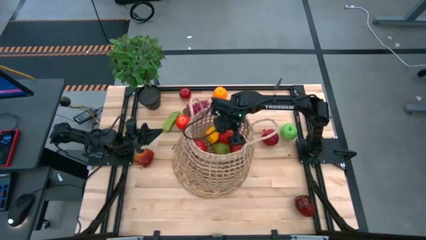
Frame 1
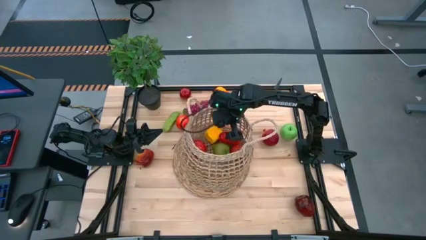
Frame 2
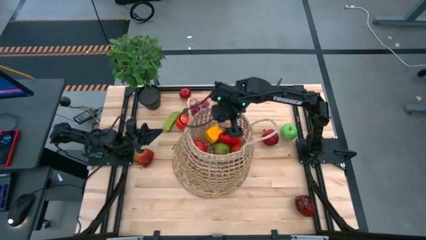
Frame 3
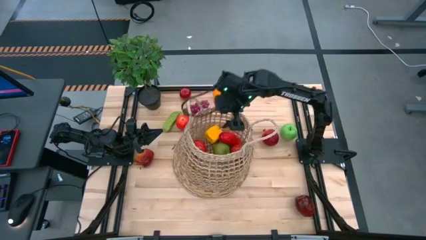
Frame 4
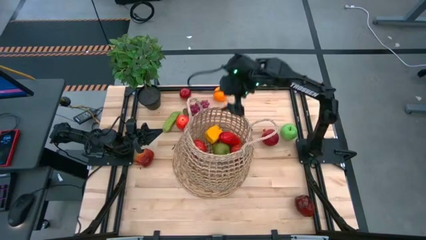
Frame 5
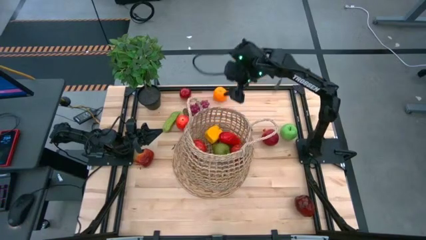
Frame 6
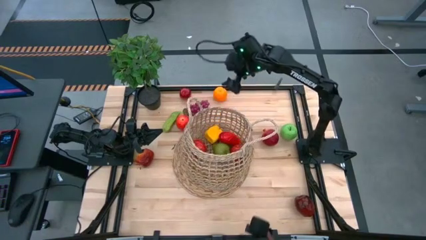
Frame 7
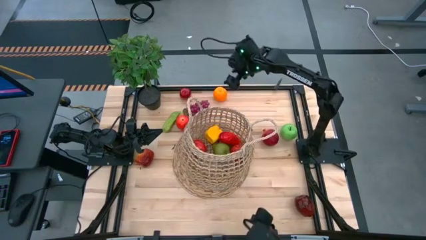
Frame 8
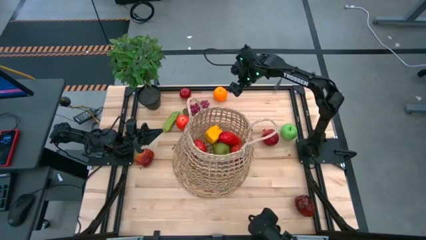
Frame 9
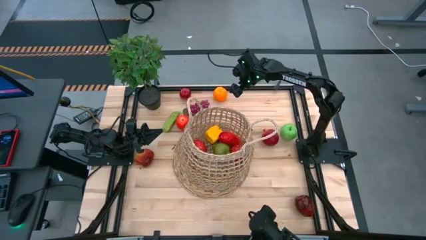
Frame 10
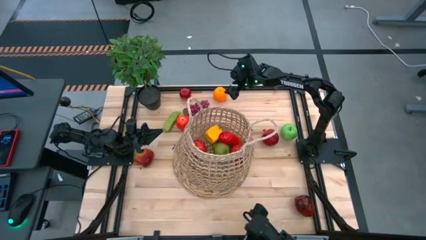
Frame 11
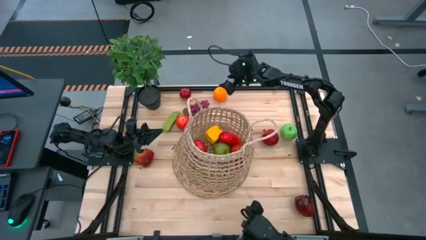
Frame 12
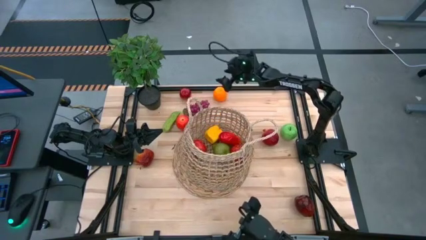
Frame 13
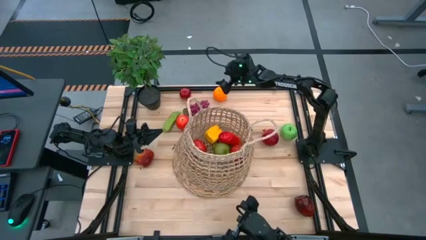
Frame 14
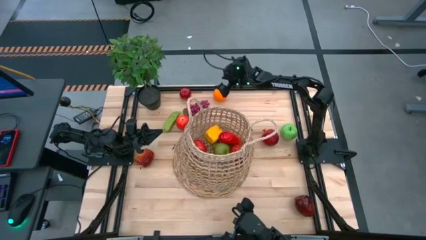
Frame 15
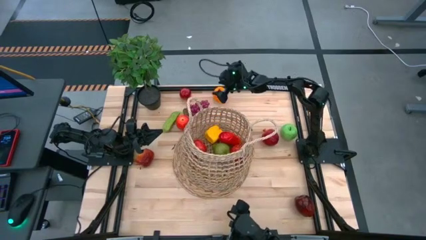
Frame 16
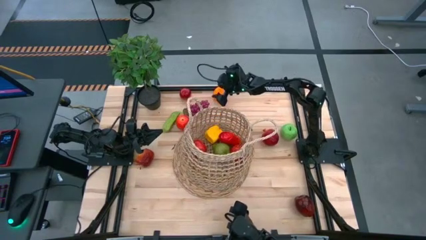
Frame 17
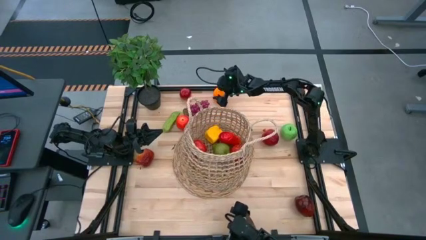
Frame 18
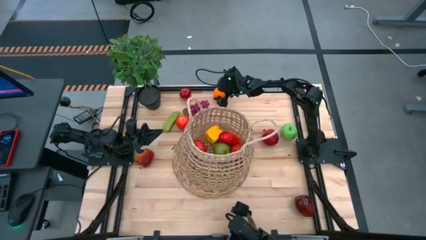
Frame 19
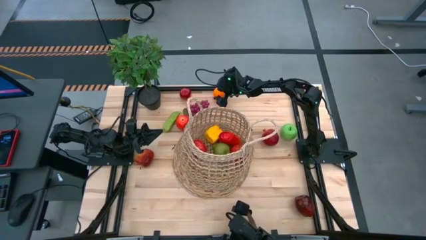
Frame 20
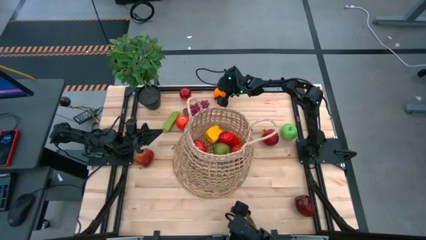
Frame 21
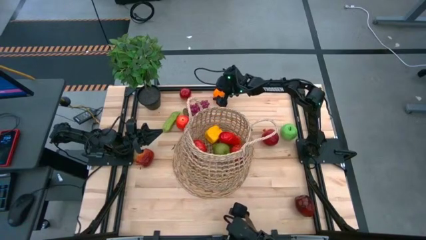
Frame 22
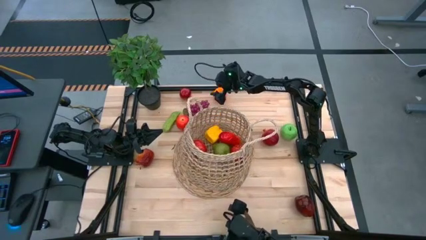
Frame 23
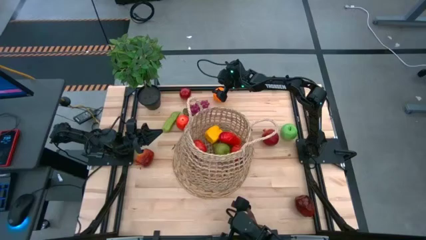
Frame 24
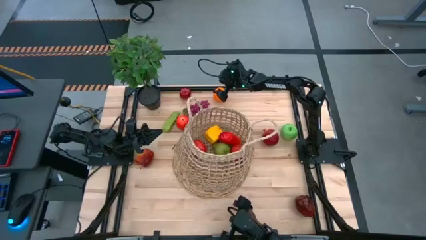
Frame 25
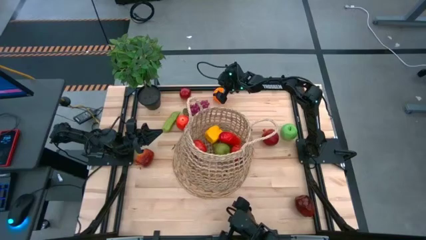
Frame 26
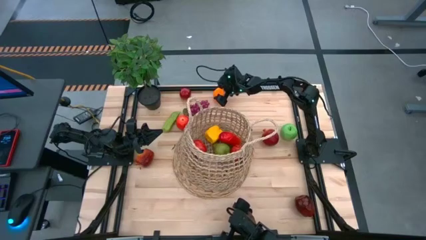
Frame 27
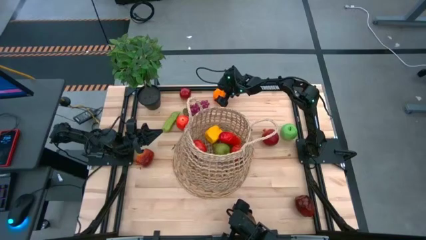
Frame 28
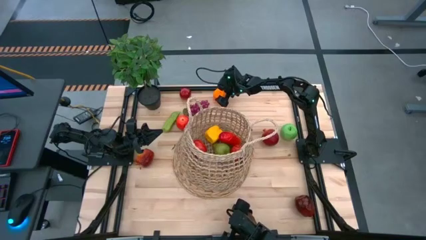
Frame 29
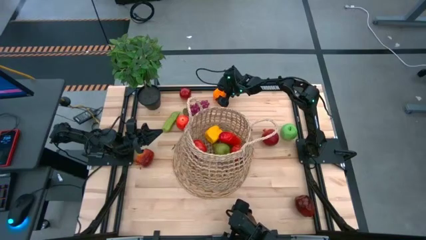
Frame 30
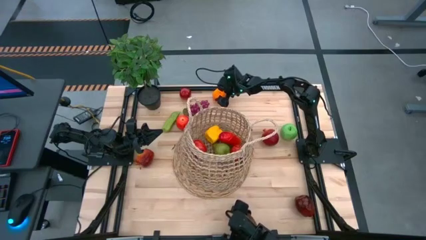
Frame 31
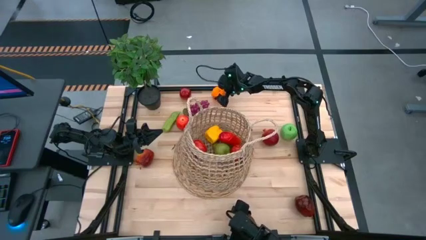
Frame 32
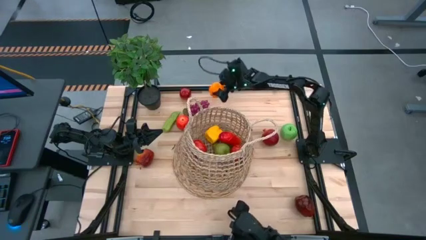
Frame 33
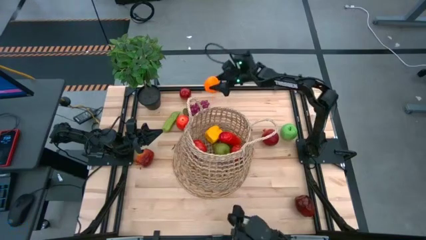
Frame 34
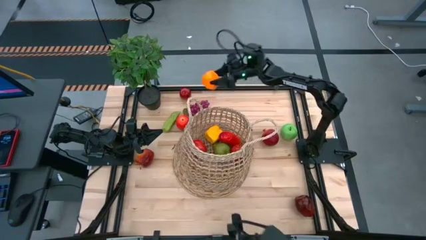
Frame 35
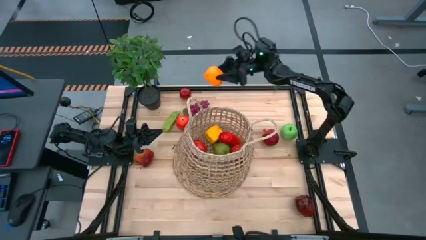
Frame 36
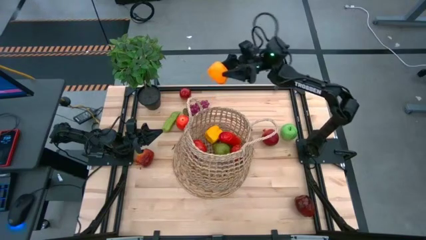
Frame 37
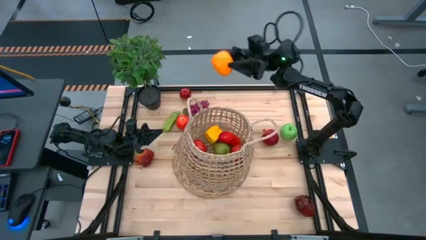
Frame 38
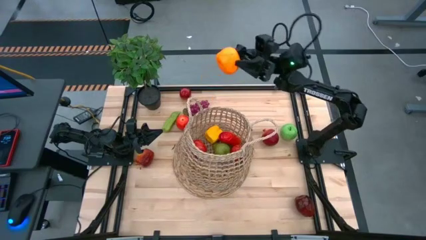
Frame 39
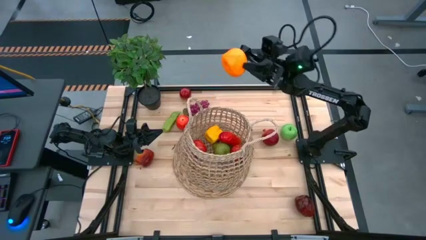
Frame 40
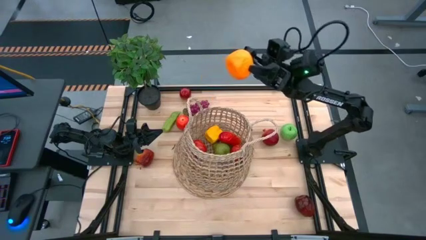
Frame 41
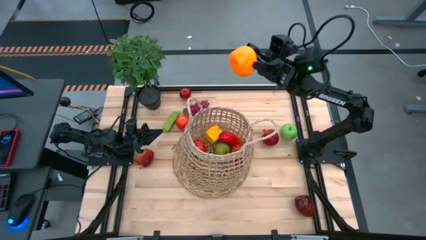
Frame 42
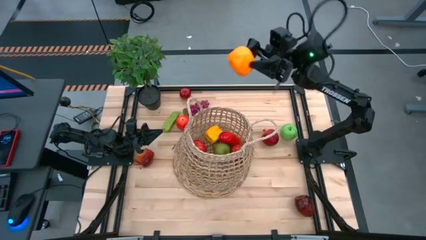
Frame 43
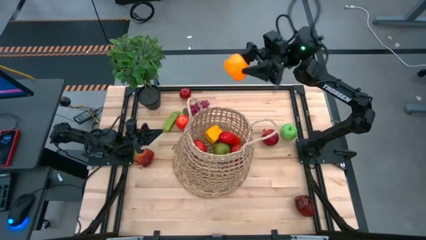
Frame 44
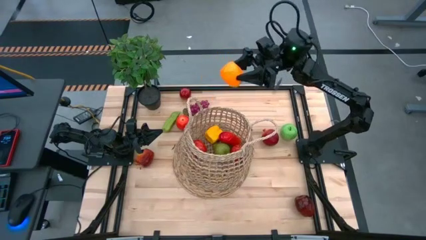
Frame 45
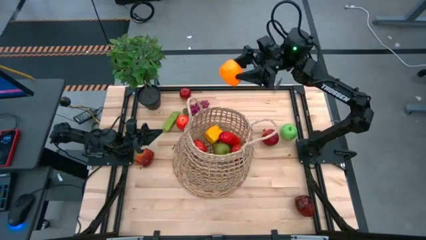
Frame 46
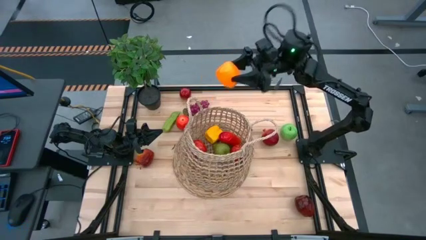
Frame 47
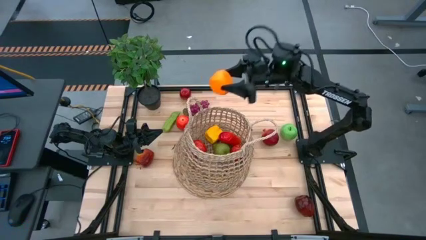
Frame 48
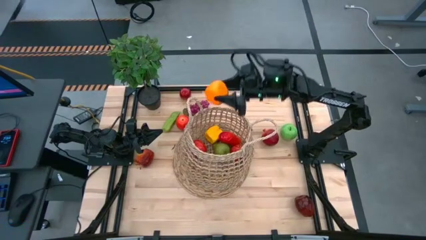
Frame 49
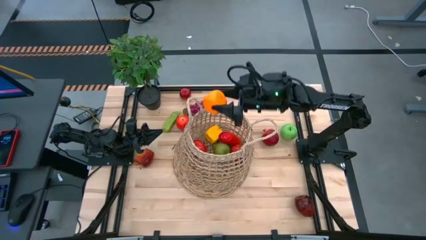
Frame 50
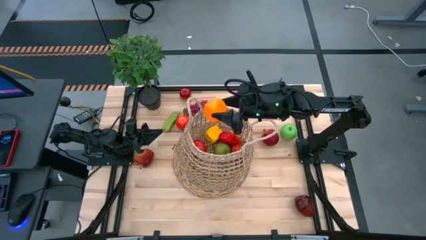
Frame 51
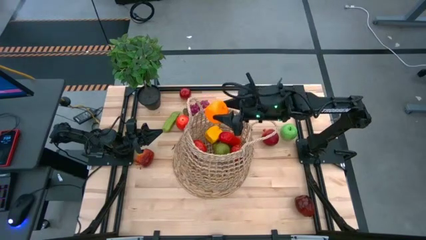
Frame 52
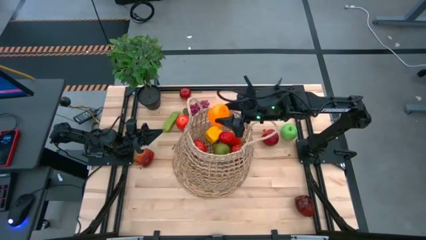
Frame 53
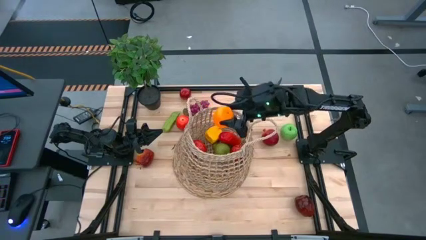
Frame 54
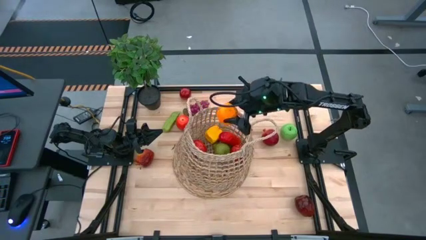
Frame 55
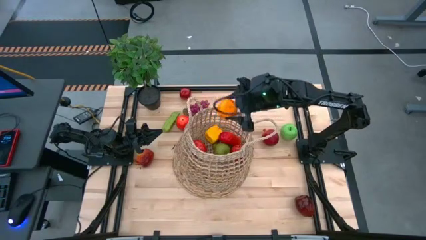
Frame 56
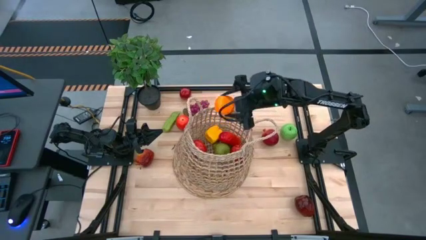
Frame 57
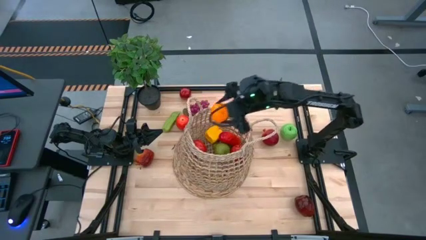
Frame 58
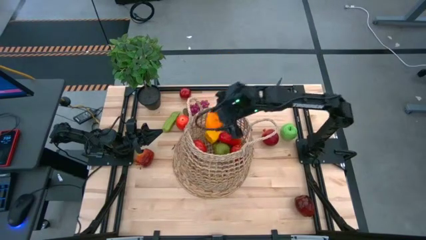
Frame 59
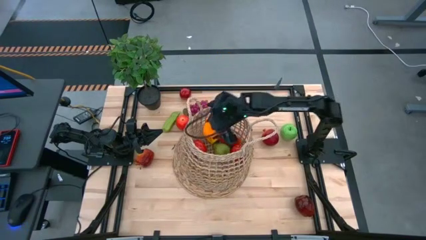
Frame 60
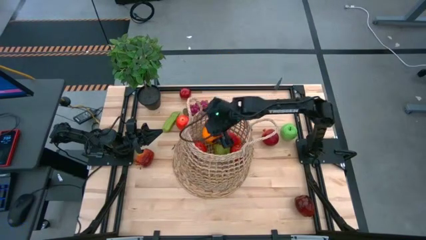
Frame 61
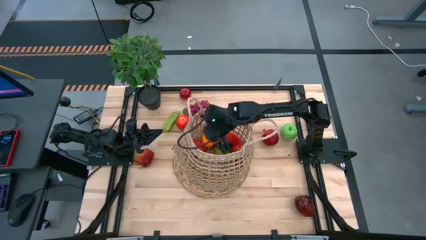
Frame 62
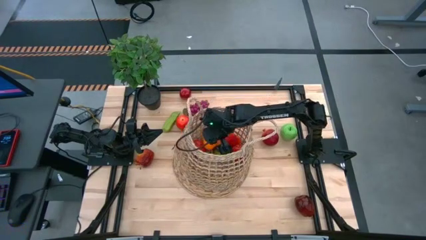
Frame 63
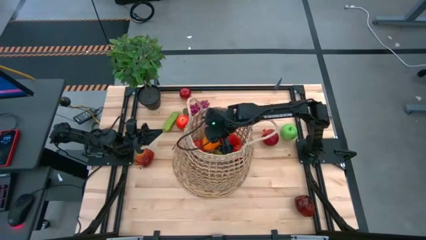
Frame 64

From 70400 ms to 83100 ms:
Task: Build produce basket
Put the orange into the brown basket

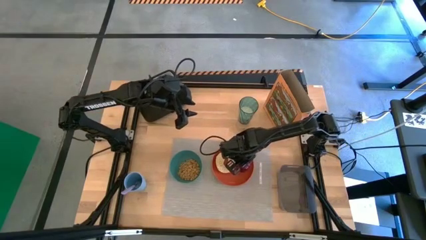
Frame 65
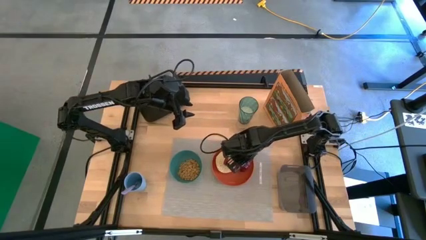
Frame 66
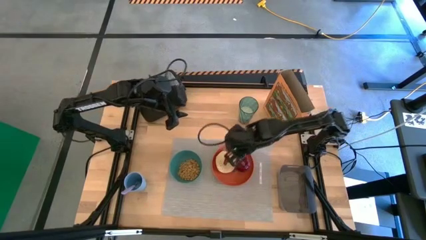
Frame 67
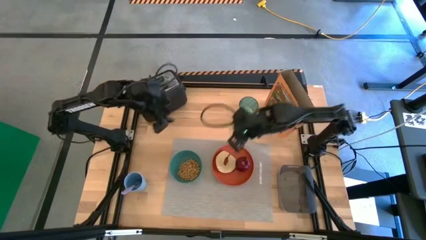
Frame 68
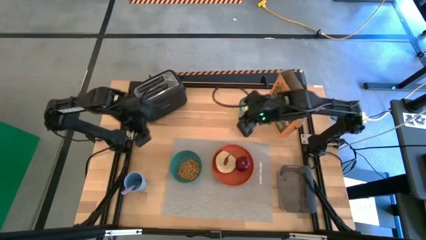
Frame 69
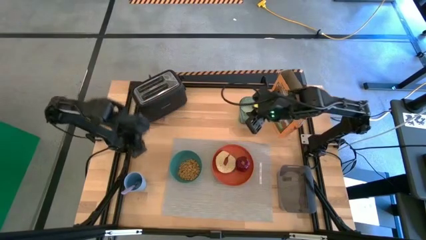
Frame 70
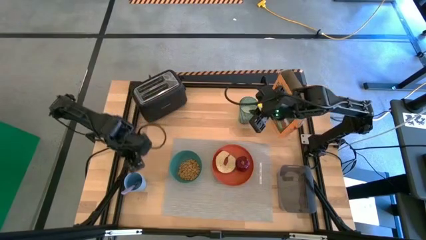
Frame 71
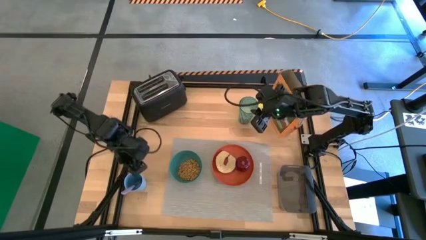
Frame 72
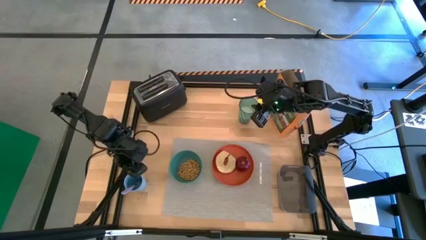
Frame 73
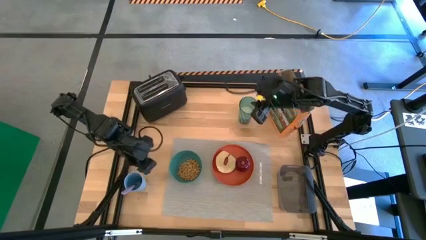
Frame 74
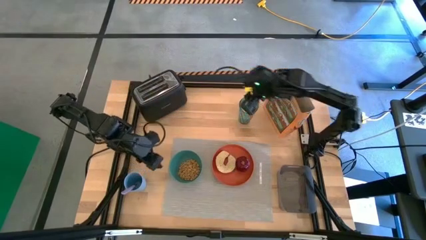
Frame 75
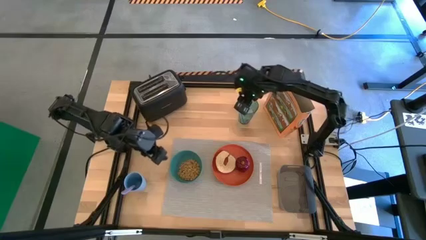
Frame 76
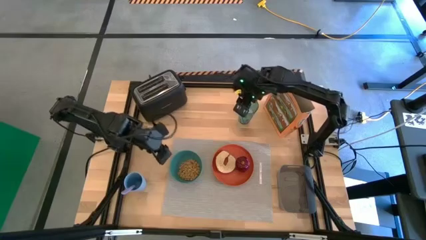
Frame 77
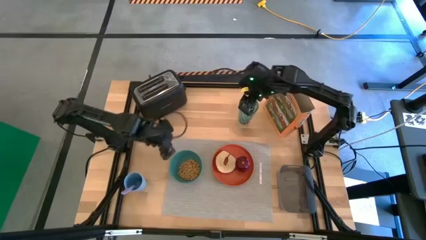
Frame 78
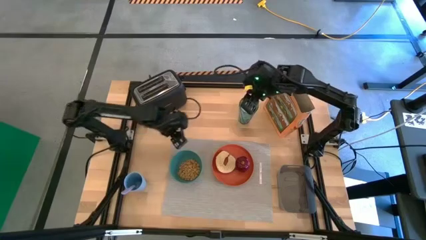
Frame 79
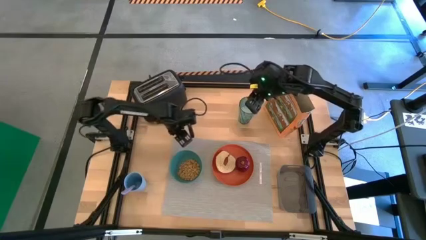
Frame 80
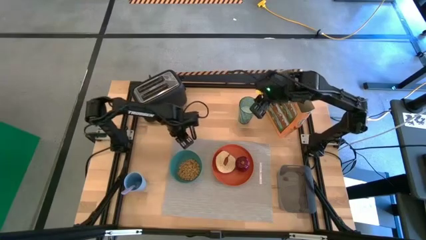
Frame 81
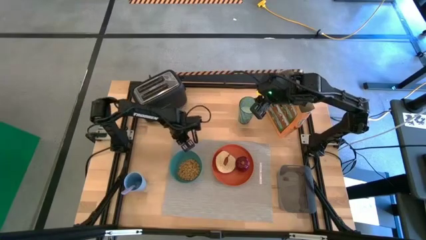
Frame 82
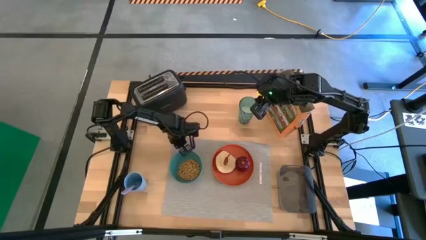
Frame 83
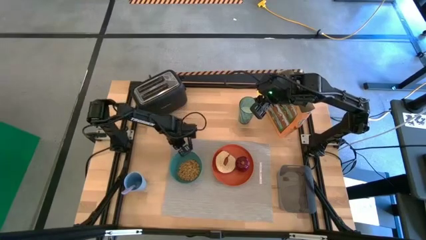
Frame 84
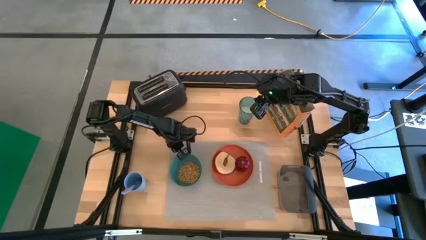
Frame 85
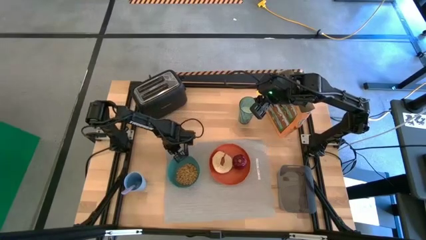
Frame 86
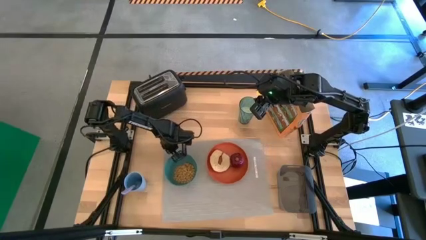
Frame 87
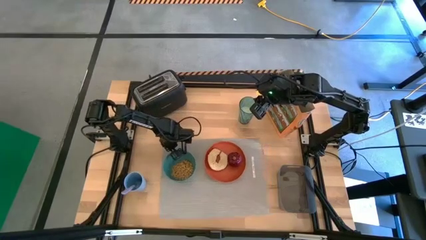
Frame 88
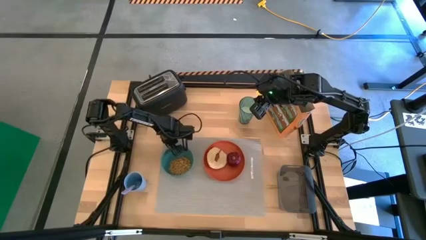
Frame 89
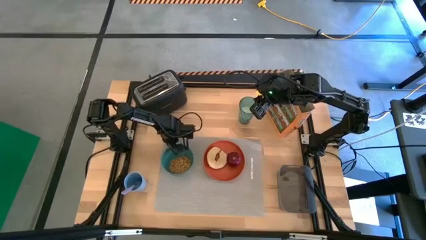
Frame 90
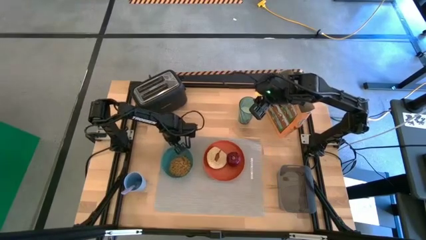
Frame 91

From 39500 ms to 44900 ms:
Task: Arrange a breakfast setting
Adjust the tablemat
